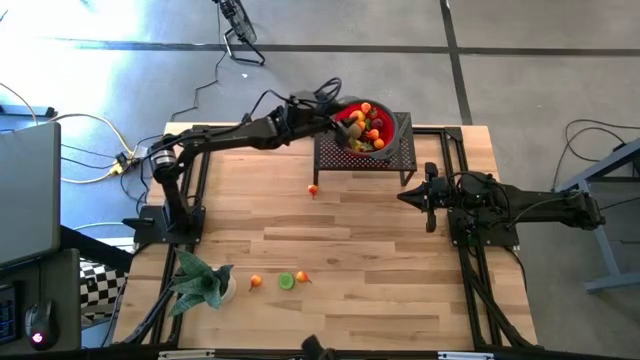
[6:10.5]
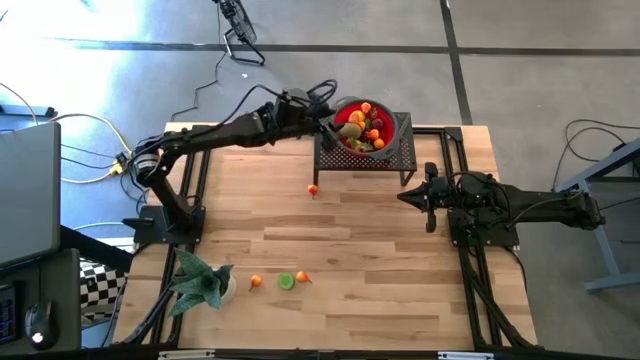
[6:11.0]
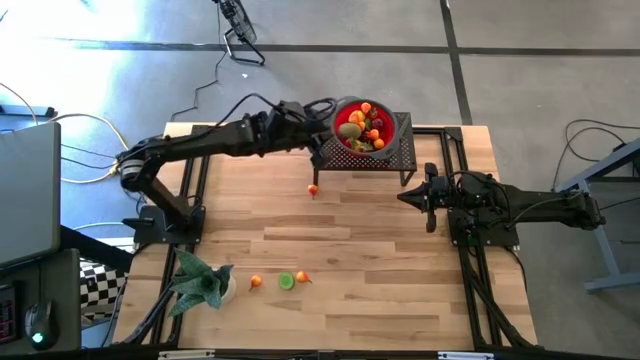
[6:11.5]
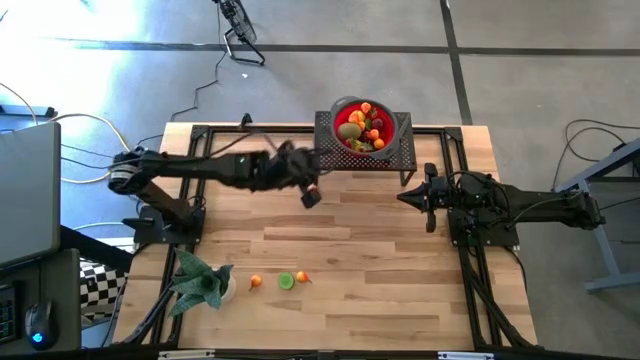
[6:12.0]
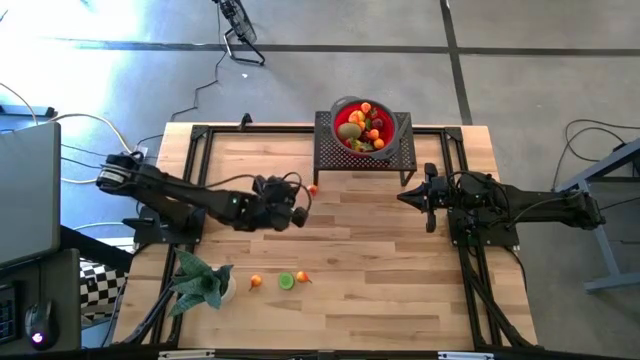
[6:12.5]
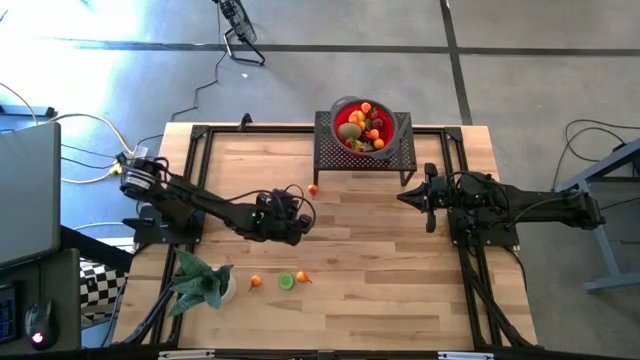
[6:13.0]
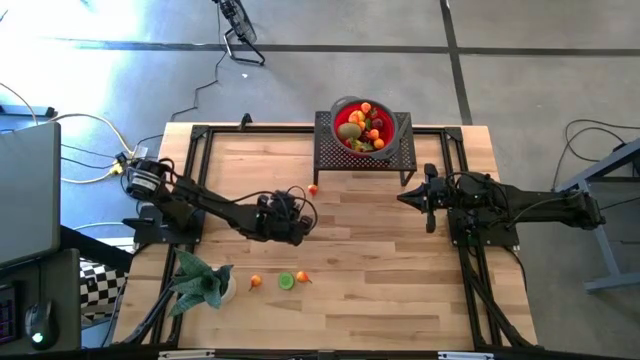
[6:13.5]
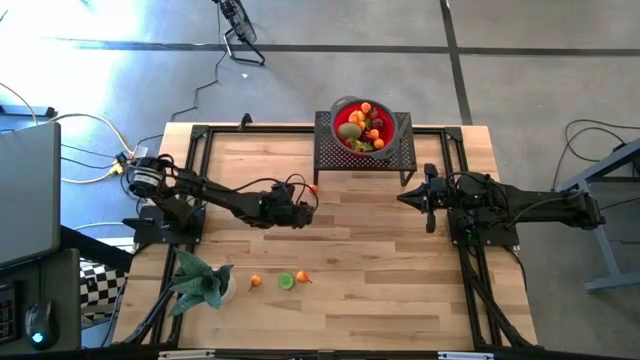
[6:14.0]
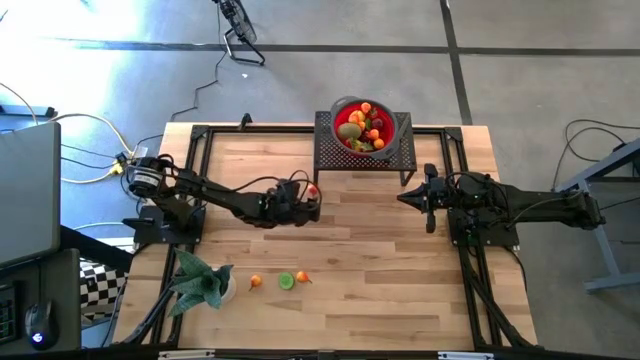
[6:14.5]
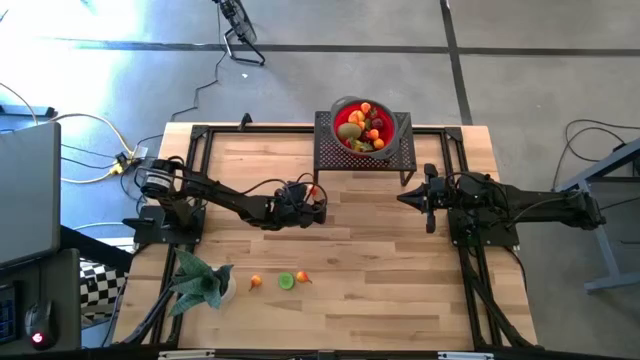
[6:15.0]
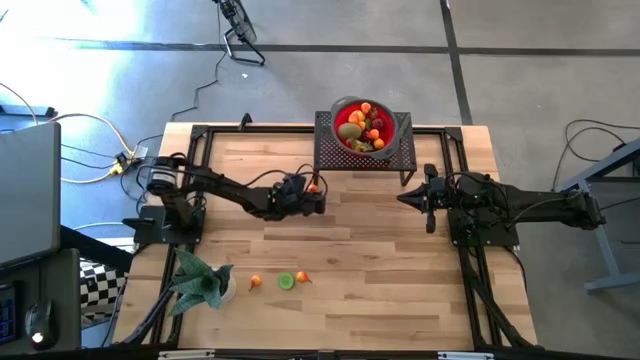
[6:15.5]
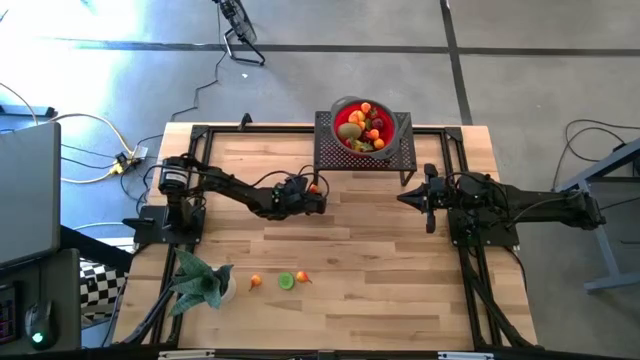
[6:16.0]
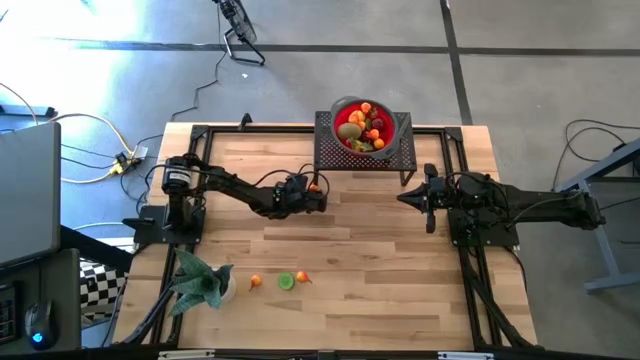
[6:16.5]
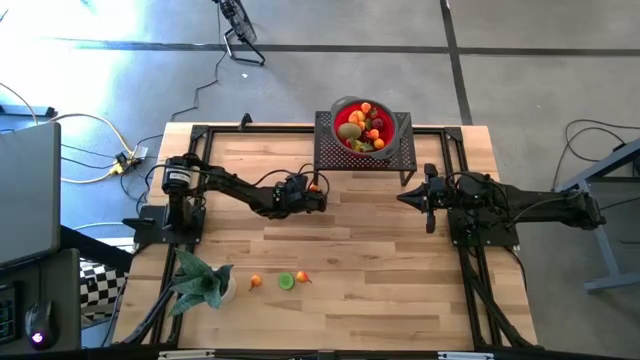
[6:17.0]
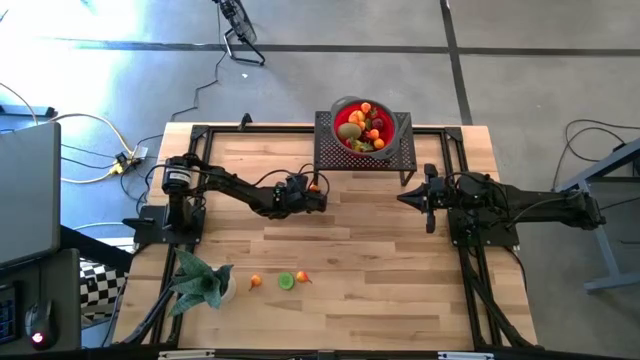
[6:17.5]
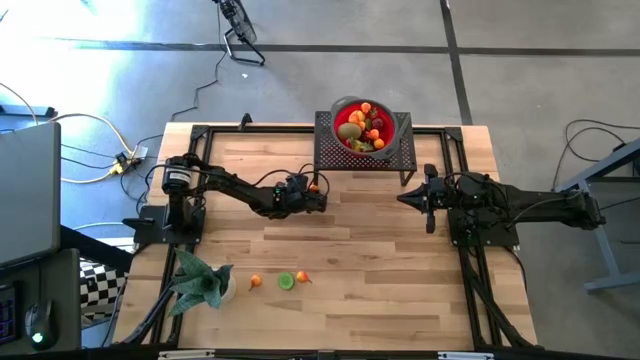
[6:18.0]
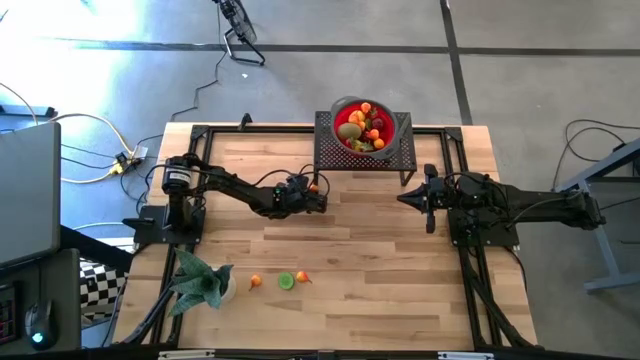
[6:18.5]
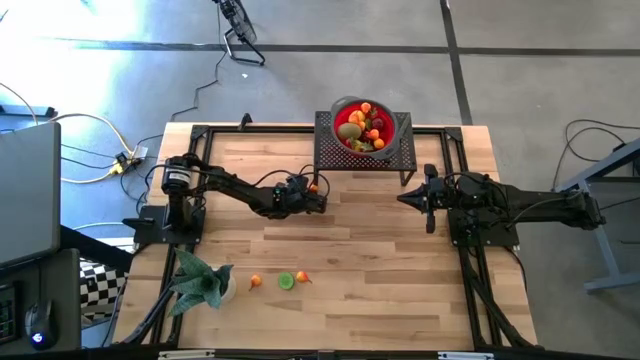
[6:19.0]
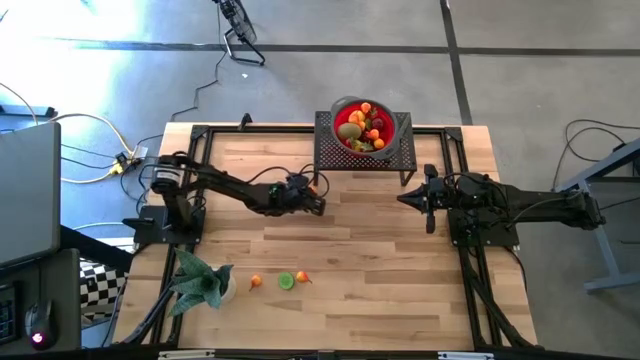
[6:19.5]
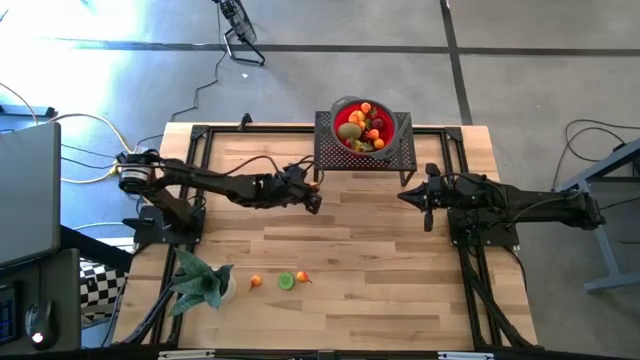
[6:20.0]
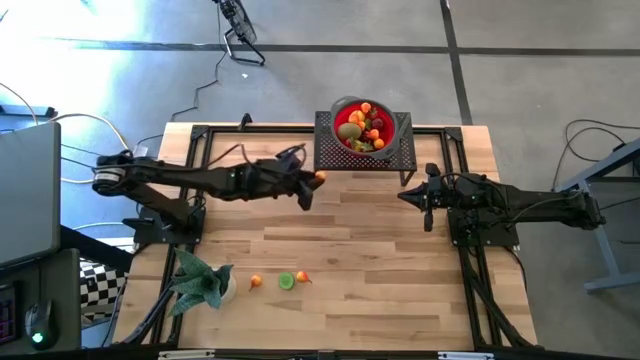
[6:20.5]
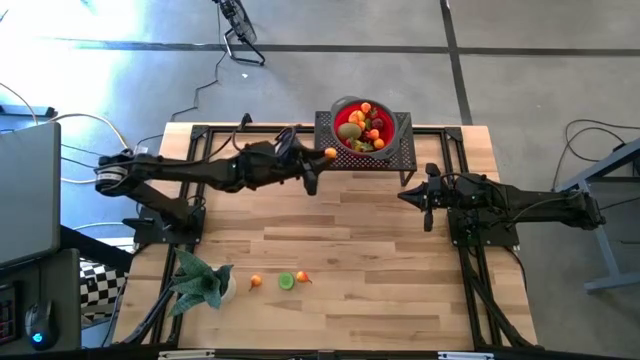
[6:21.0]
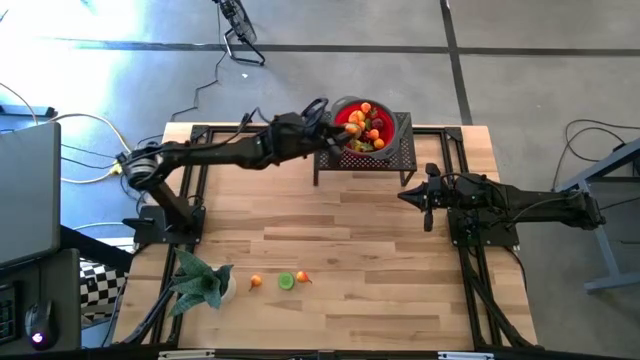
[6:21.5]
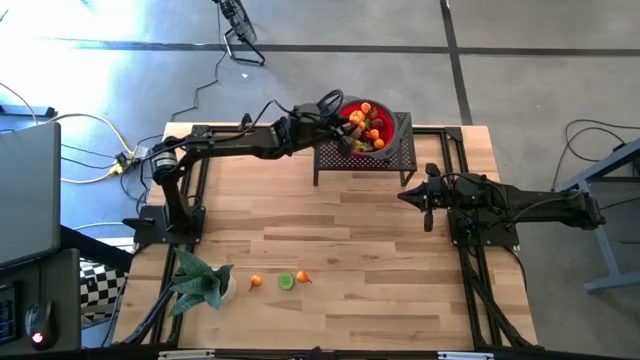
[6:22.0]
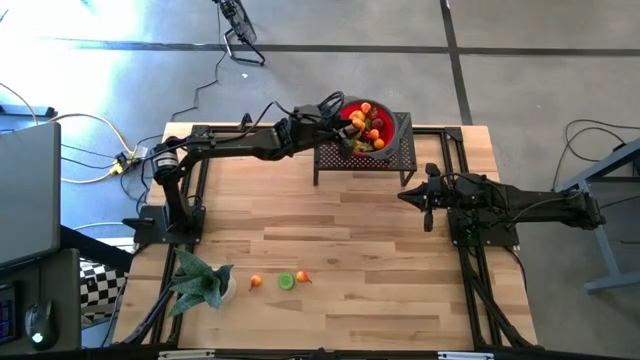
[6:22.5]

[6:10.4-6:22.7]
Task: Pick & Place Fruit
Put the pear into the strainer on the shelf

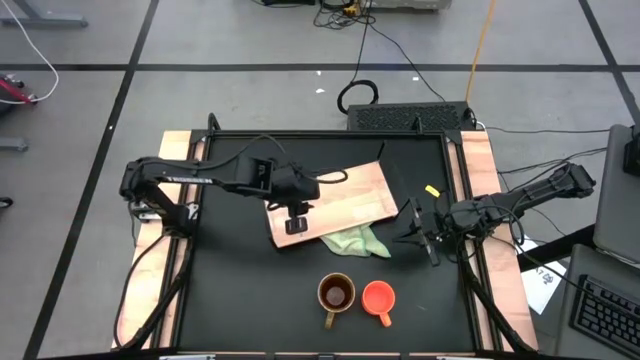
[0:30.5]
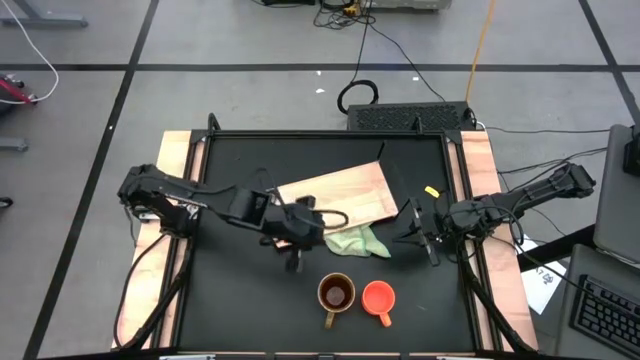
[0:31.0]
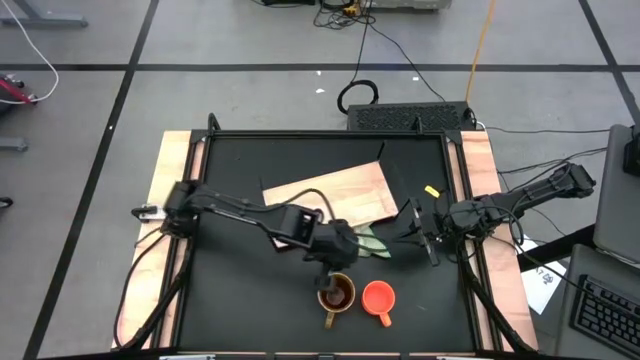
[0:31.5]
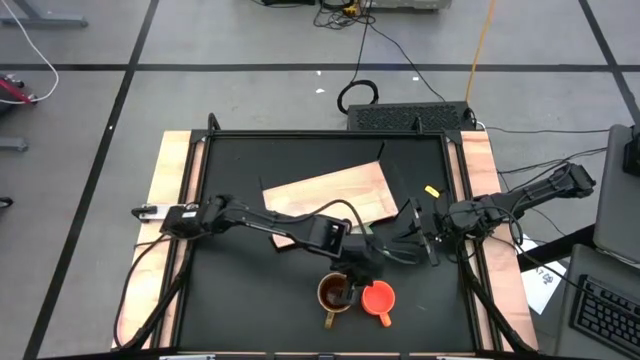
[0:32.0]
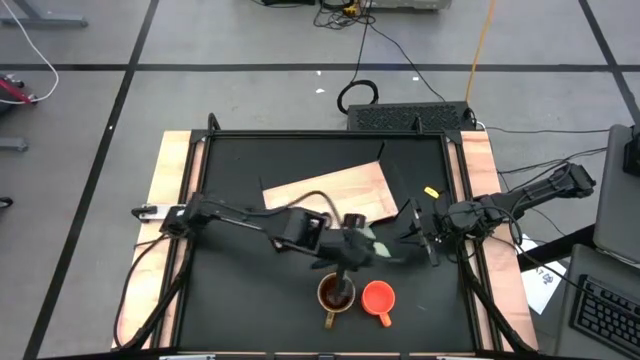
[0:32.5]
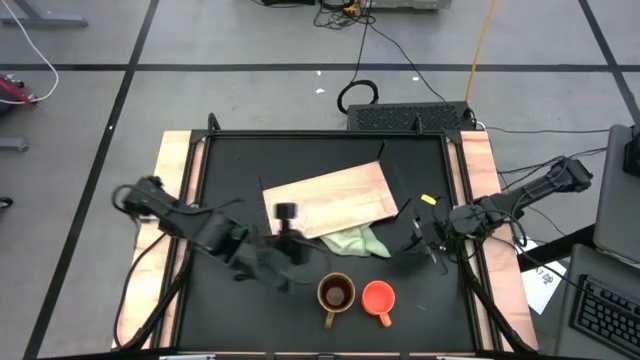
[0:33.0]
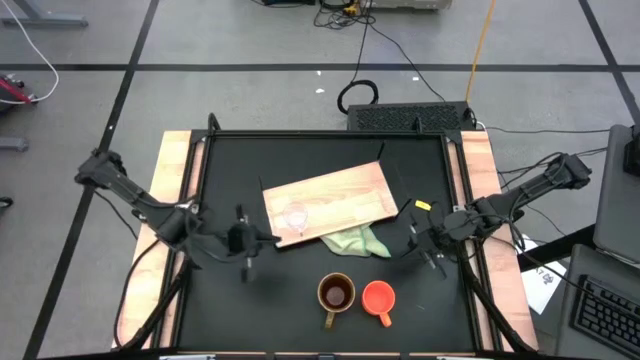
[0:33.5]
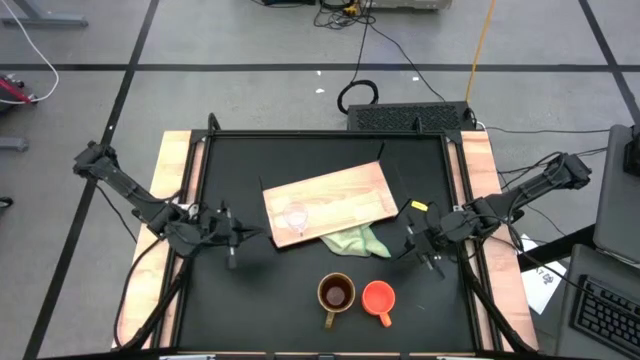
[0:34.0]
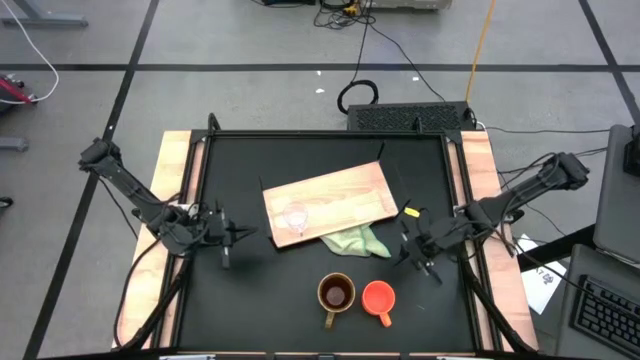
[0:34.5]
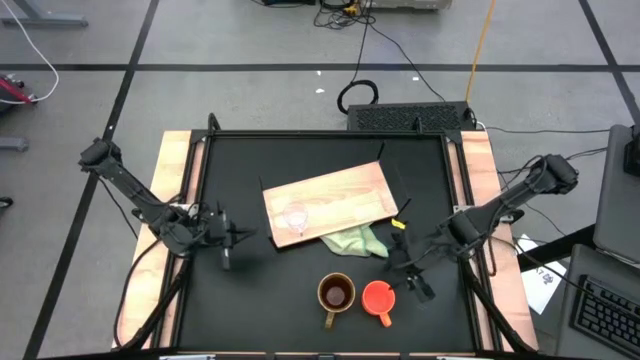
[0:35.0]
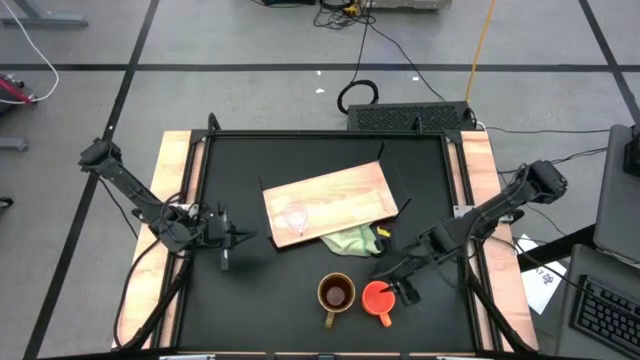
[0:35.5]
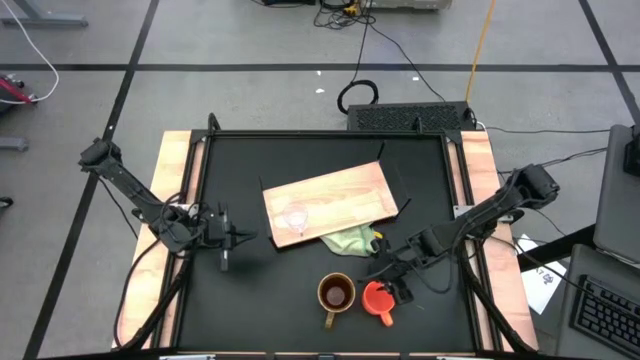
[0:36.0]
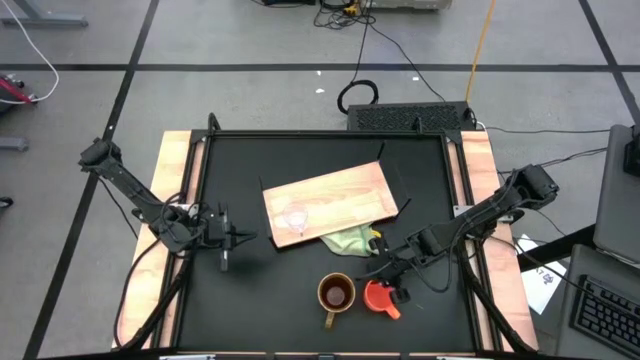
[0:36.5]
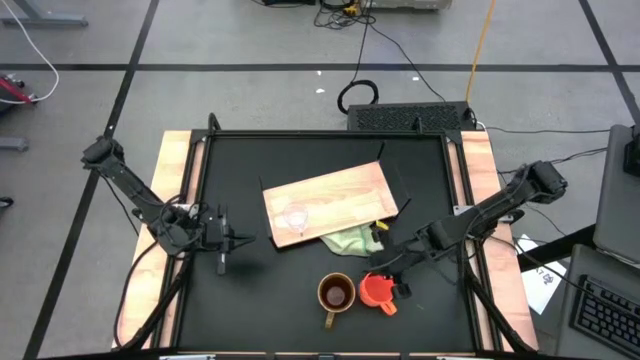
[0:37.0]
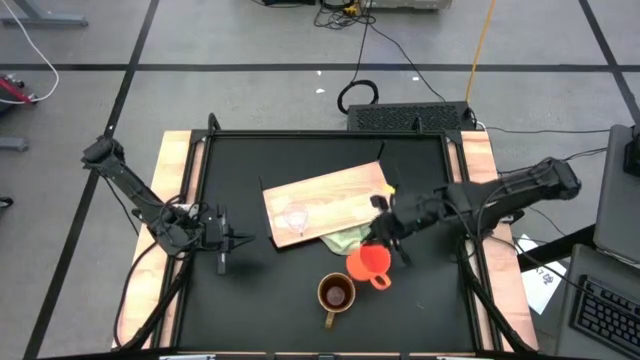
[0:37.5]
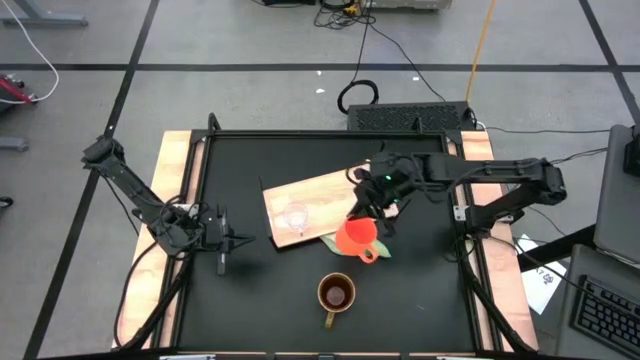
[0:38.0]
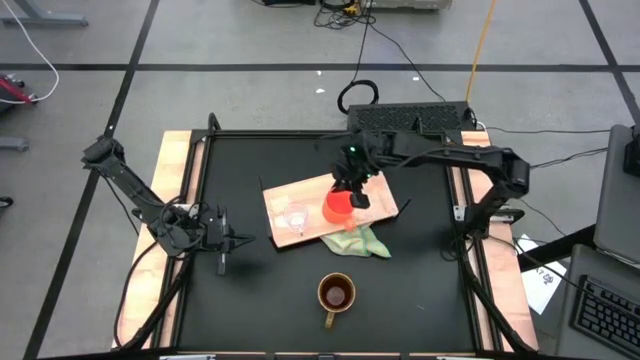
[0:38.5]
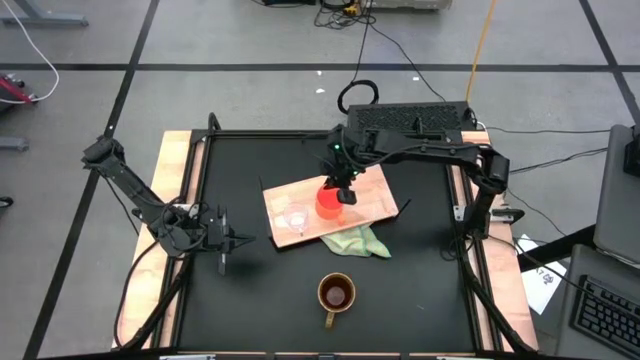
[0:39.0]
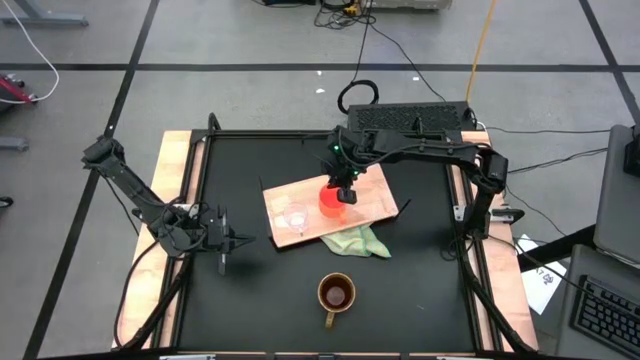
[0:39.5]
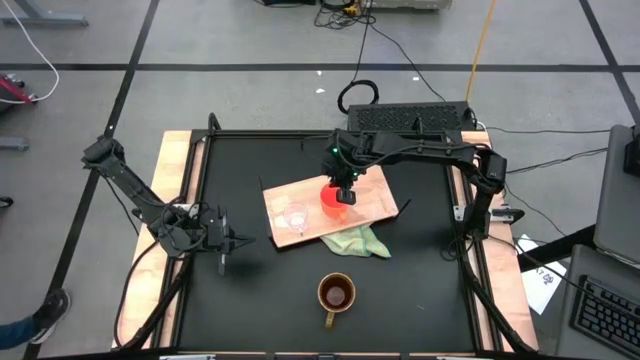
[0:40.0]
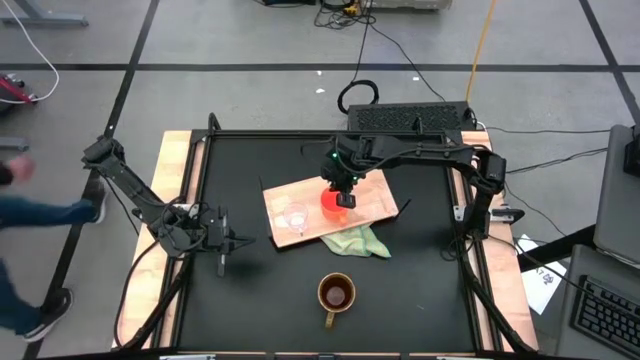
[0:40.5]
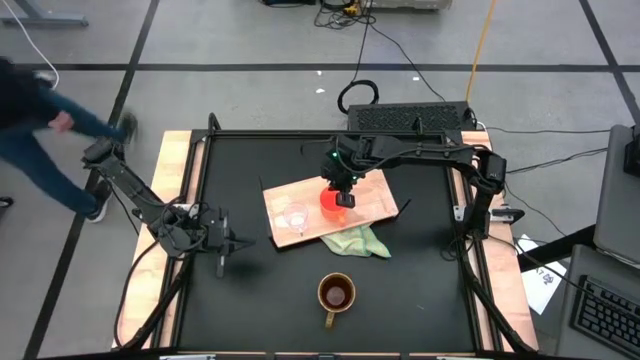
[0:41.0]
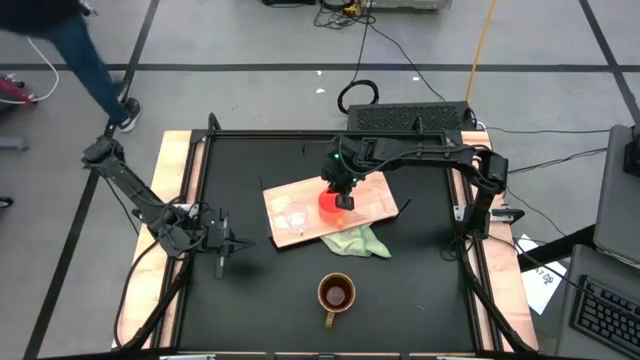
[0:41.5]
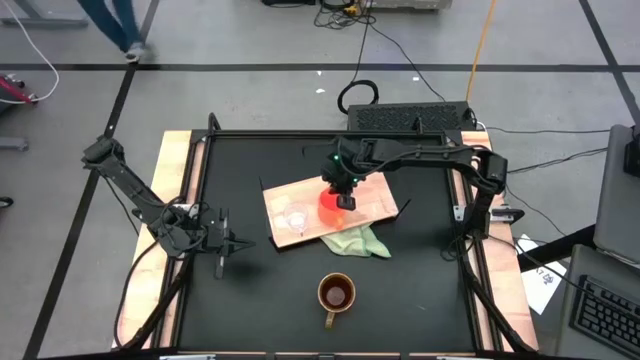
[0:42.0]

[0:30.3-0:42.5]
Task: Stack small to large cups/mugs on shelf
Put the orange mug on the shelf
